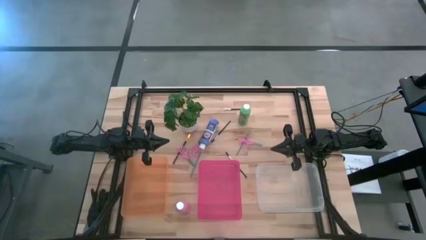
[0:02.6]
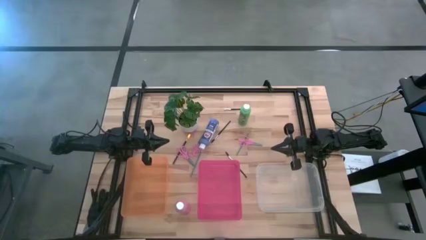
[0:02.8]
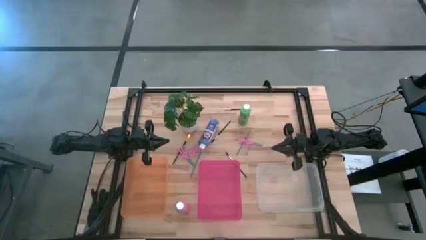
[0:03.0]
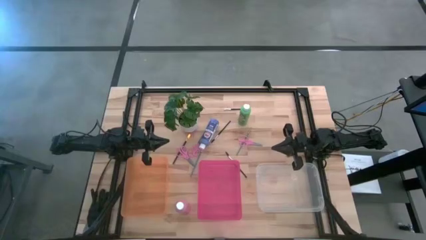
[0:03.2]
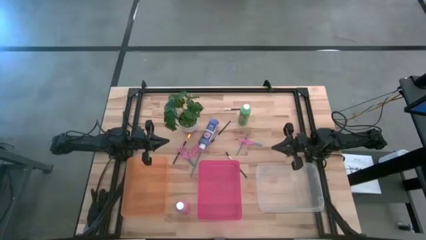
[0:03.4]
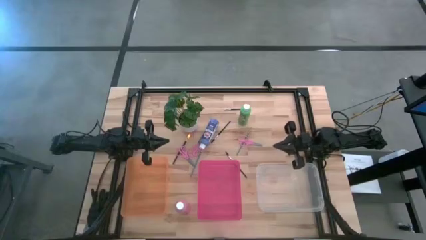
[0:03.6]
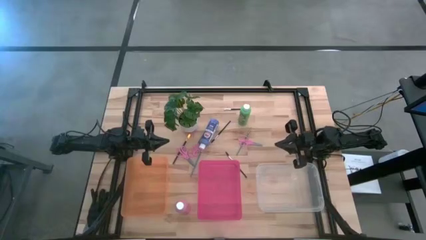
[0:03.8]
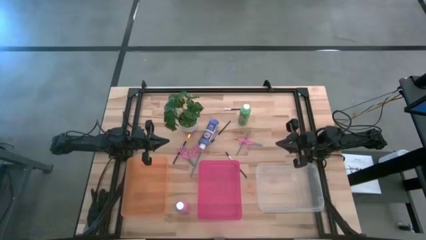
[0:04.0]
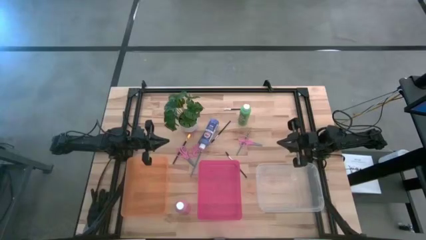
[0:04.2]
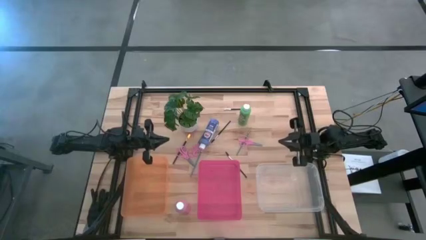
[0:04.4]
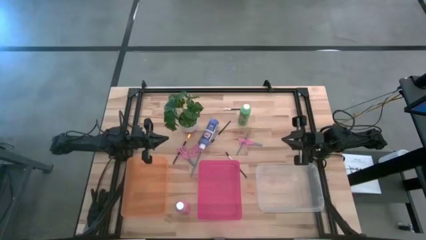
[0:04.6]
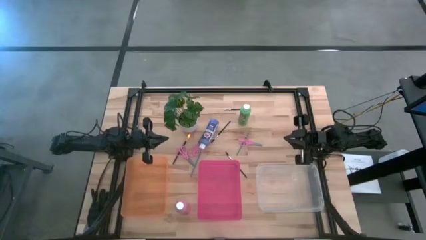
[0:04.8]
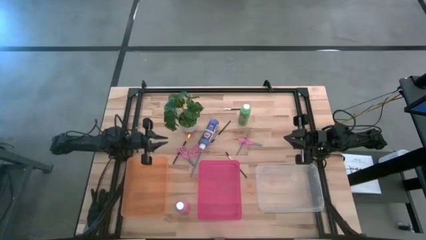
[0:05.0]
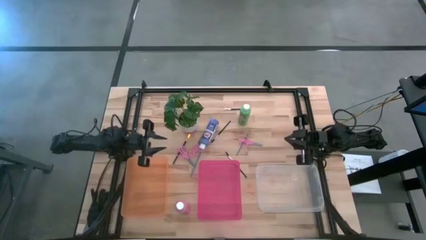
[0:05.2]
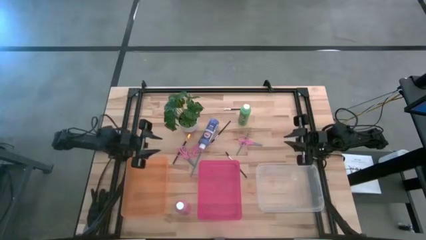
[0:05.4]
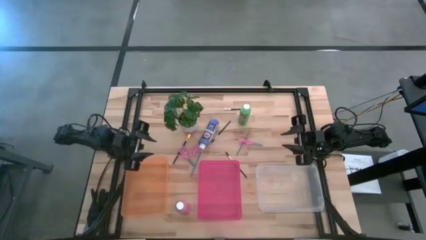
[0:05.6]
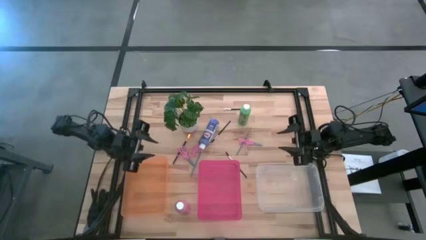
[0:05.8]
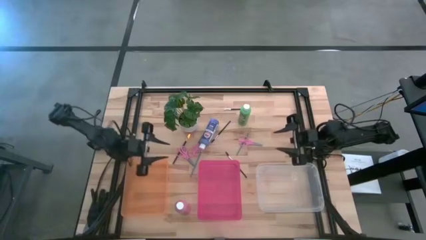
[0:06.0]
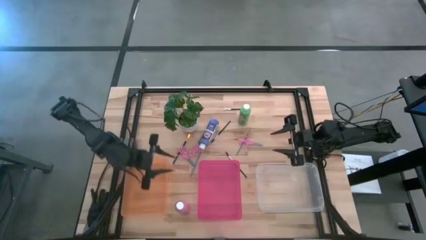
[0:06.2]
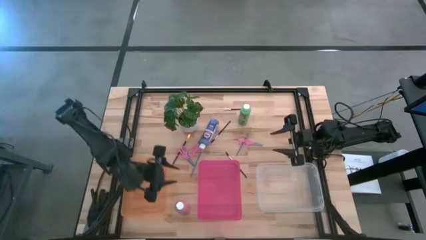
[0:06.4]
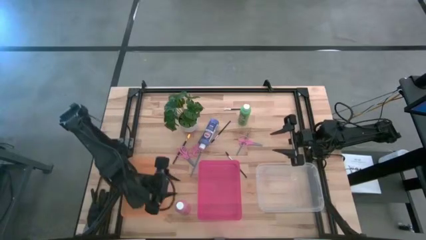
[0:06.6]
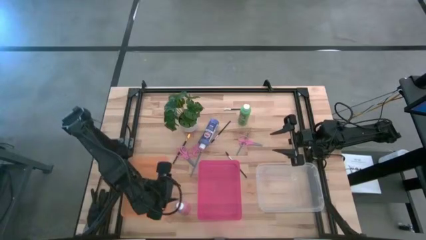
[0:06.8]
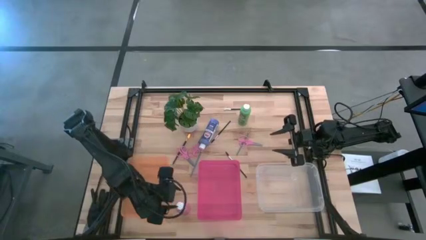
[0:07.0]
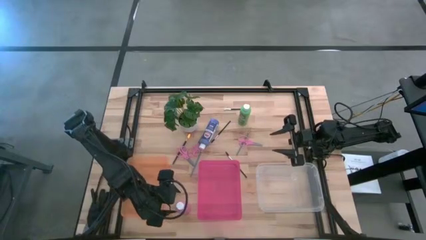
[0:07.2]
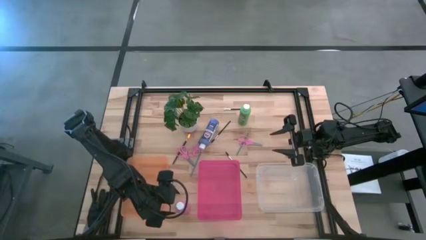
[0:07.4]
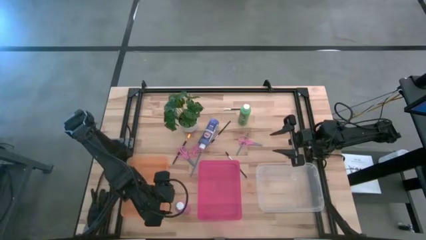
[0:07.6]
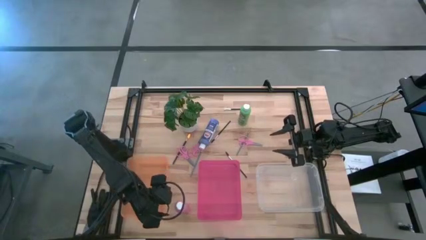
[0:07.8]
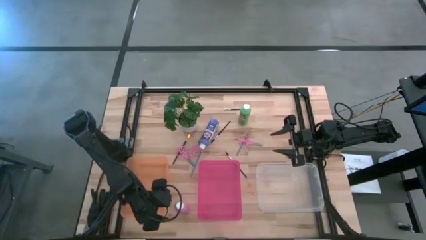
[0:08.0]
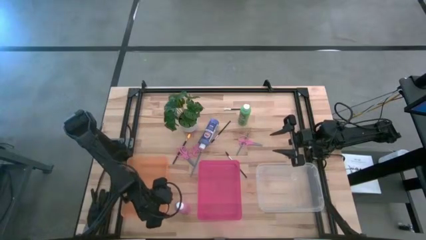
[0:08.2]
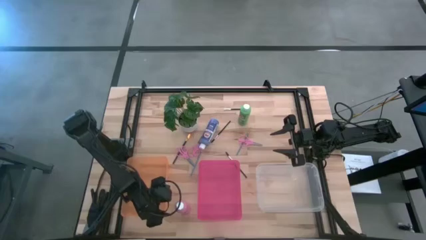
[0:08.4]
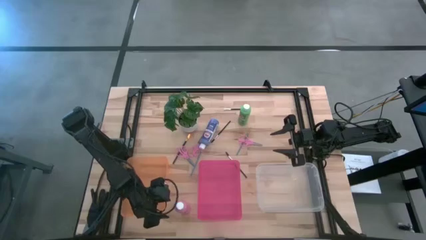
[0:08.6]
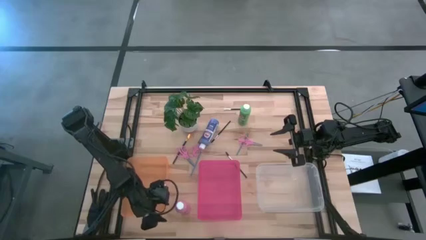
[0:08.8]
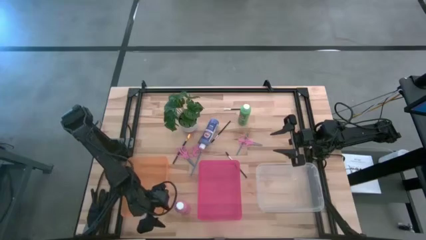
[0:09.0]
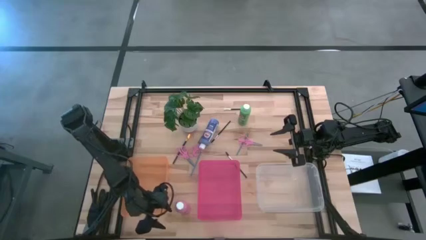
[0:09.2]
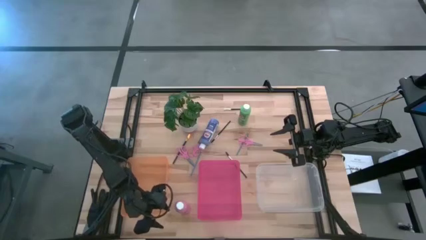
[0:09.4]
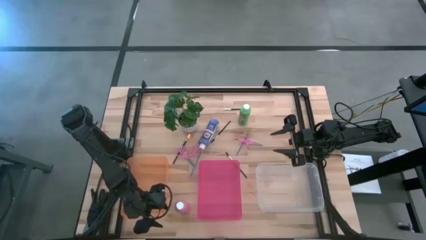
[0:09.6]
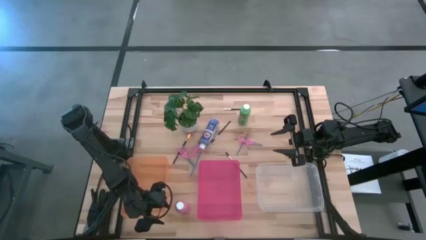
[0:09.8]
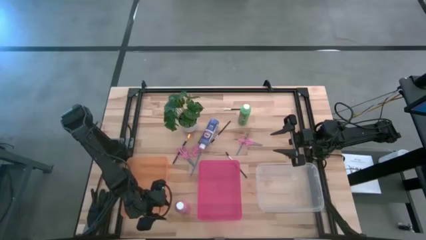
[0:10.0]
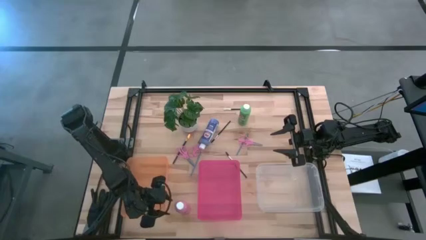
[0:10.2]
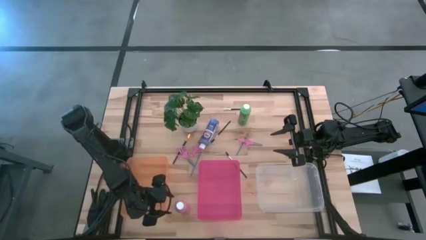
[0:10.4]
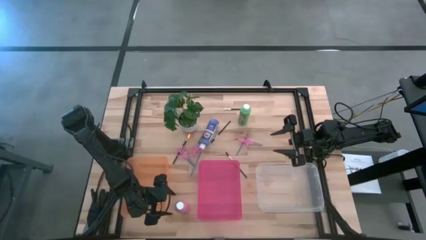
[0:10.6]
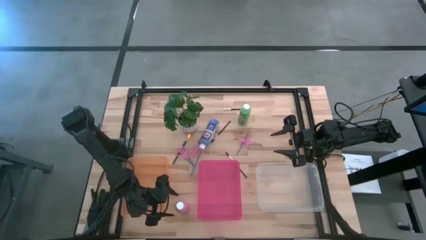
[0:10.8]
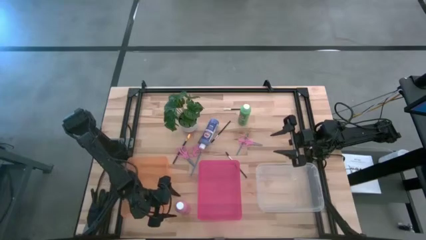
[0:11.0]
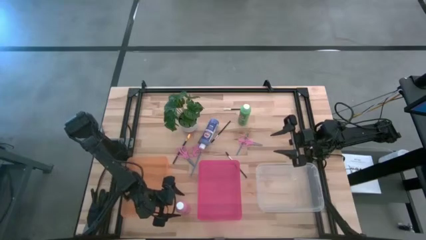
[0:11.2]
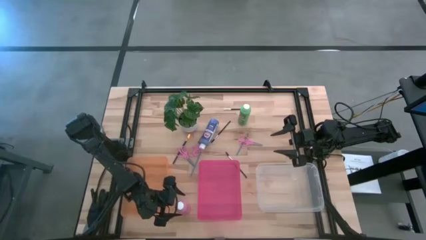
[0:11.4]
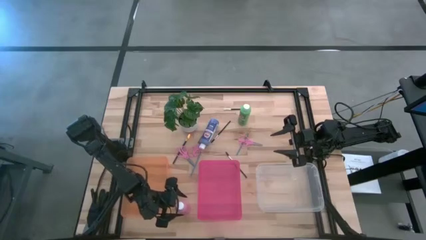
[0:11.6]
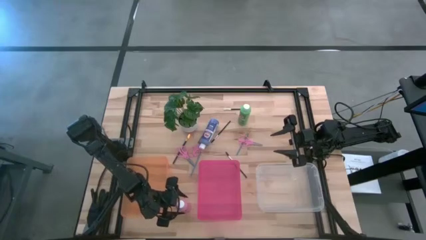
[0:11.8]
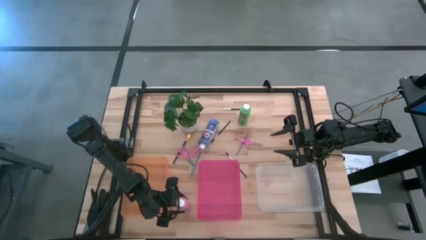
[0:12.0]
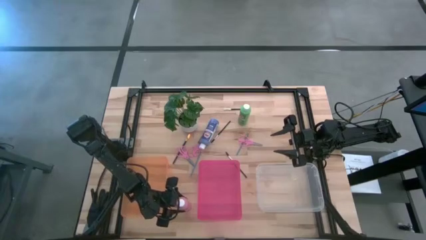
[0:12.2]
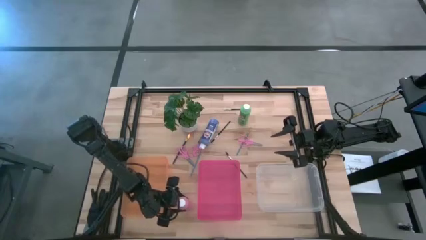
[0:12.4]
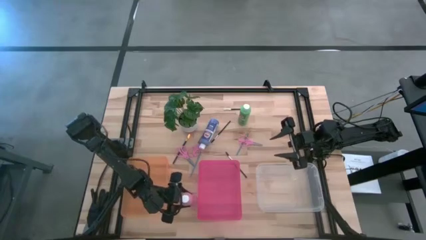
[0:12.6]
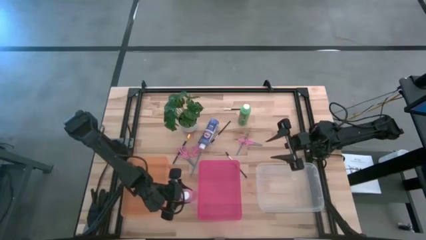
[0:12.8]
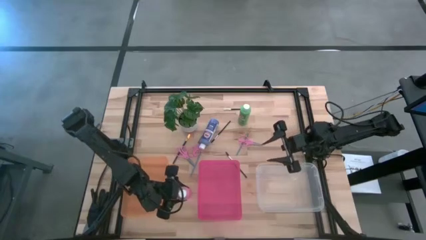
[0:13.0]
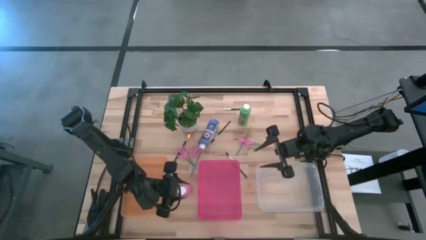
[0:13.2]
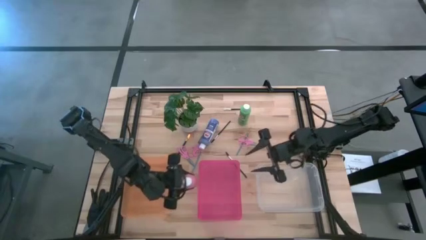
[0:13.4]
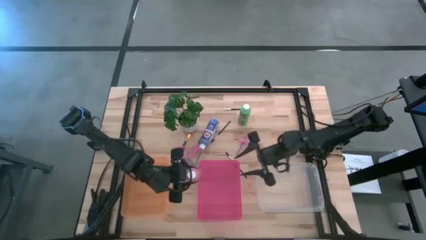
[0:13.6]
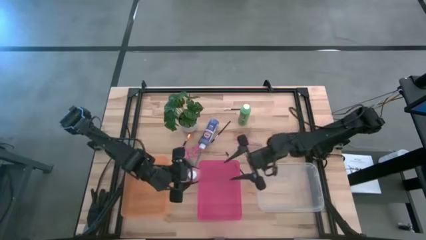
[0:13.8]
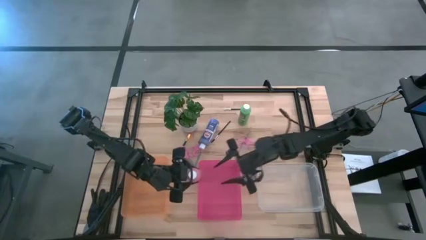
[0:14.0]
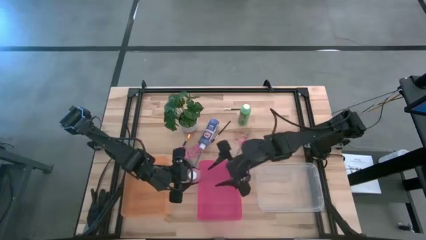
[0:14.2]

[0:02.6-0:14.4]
Task: Pick & Place Paint Supplies
Put the pink paint bottle into the transparent bin

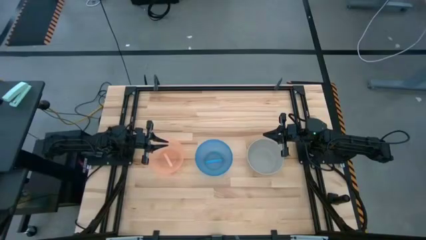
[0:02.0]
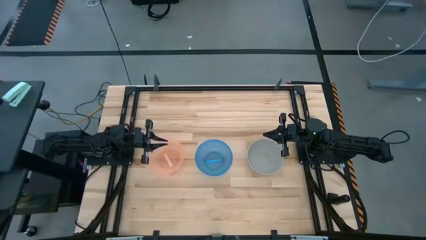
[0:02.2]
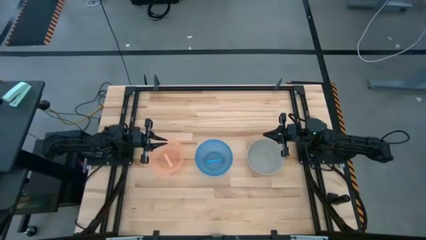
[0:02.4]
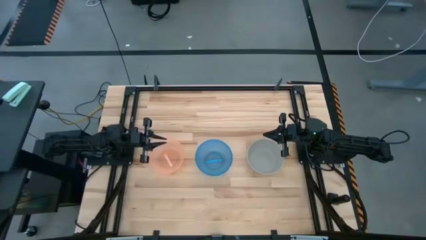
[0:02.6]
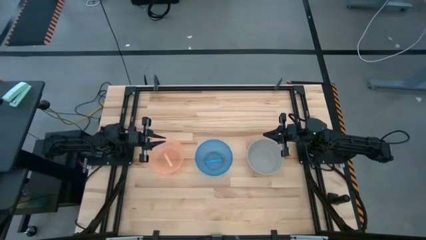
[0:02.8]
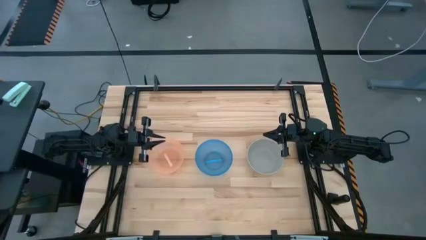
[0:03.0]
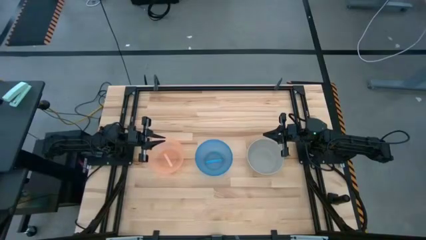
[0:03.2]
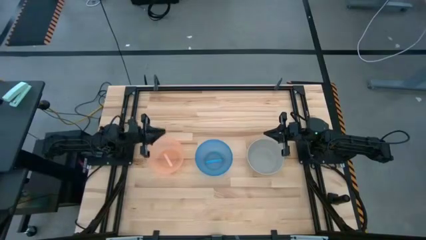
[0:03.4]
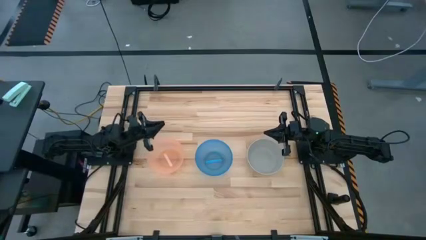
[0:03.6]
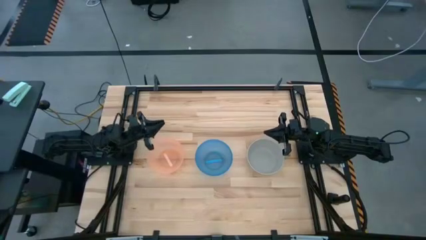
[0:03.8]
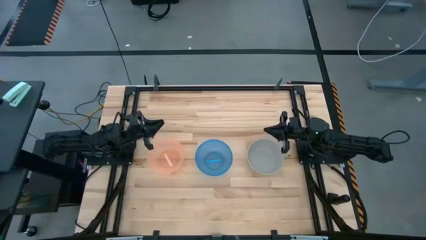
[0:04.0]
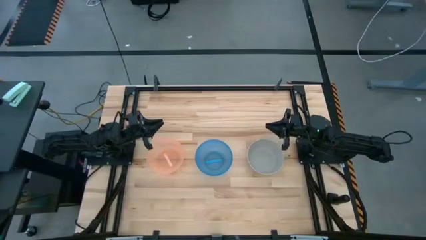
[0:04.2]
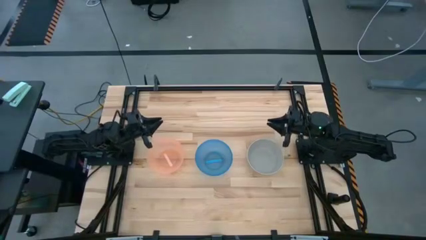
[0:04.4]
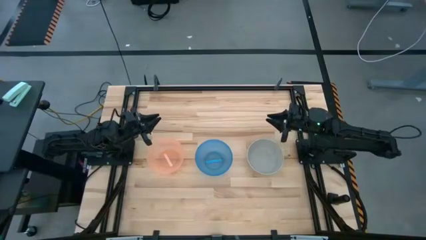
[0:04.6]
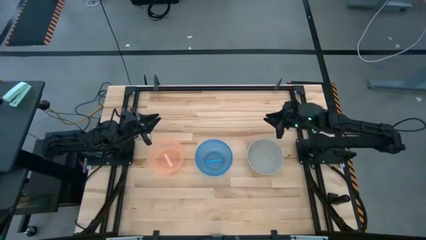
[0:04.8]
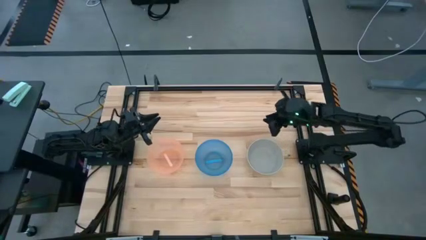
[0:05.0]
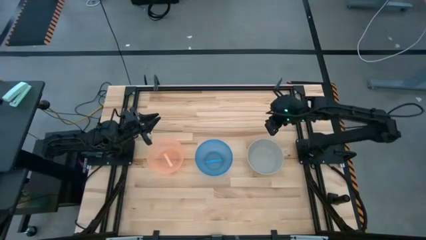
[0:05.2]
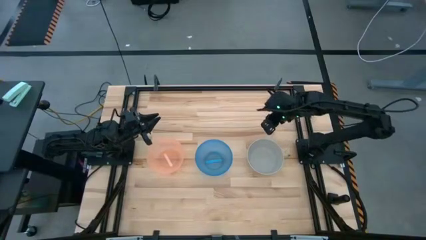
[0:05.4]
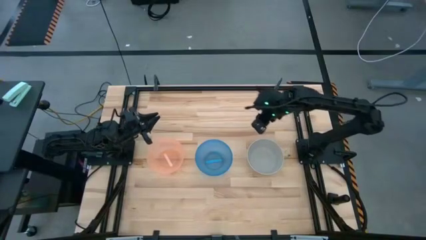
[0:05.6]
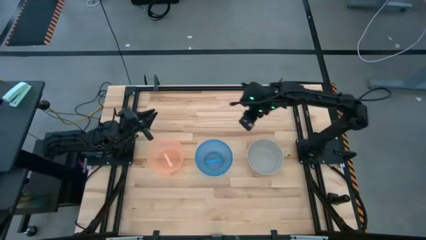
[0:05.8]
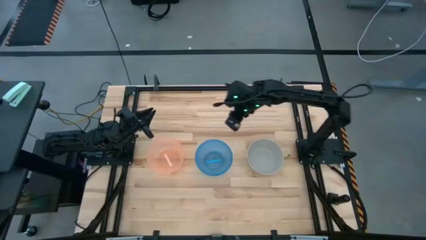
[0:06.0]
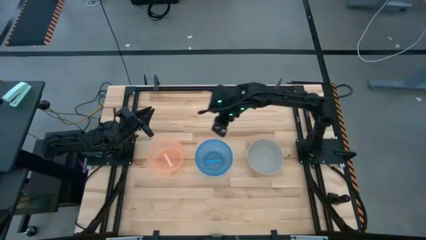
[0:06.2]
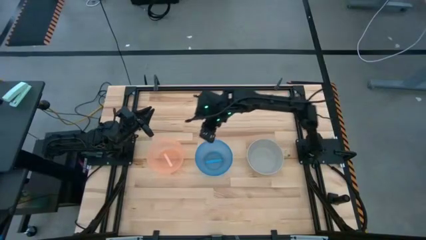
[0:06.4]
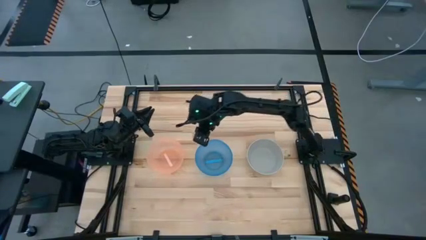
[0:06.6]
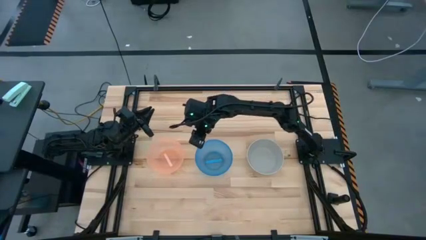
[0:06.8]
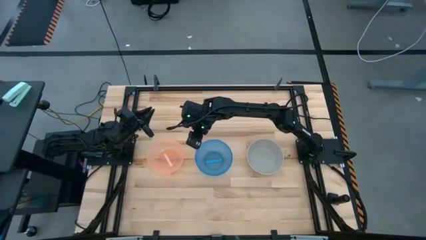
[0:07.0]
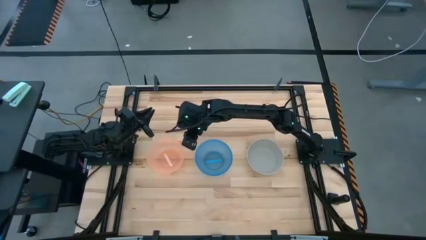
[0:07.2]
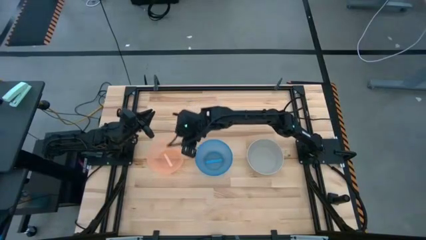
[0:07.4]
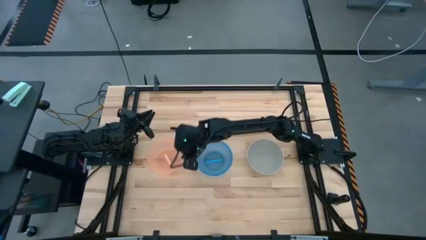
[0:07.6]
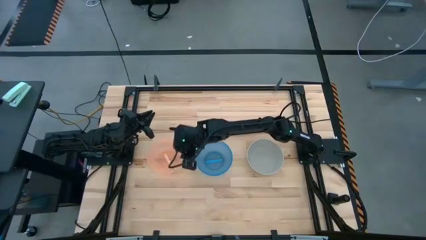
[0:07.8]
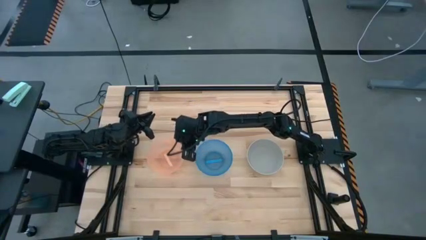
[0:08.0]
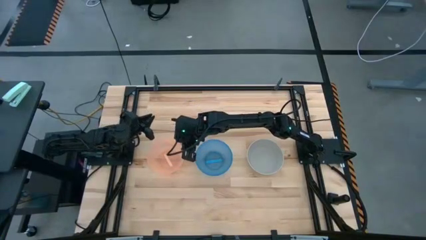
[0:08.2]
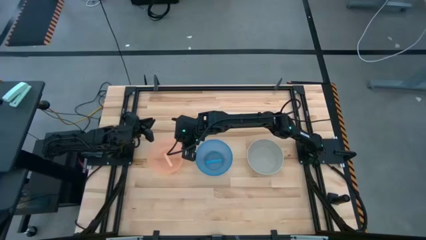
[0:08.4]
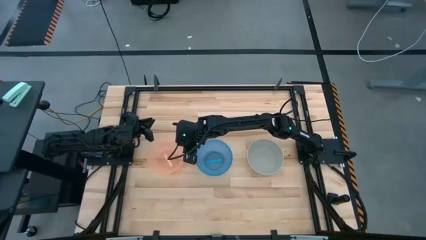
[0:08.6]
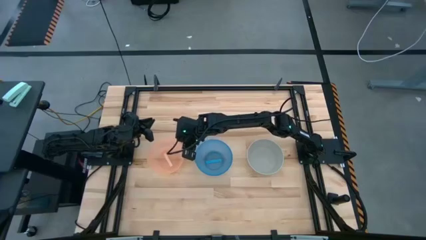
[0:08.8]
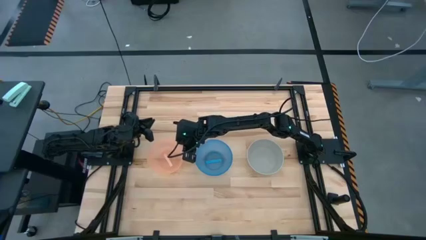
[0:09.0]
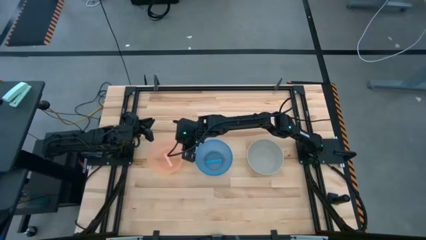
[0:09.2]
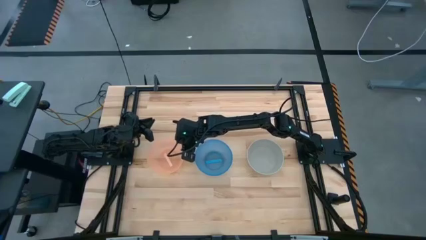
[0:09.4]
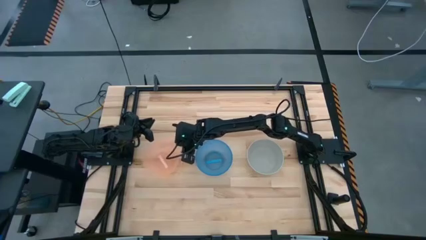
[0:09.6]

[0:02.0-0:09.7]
Task: Nest bowls inside each other
Stack the orange bowl on top of the gray bowl
